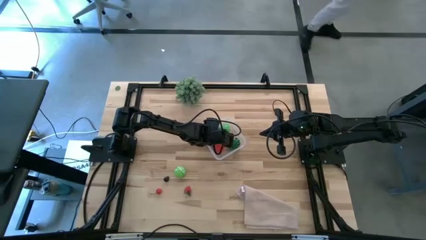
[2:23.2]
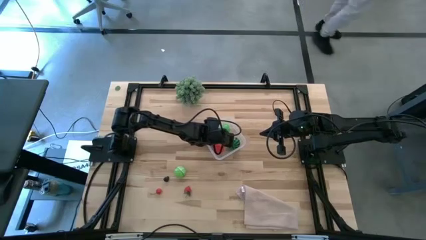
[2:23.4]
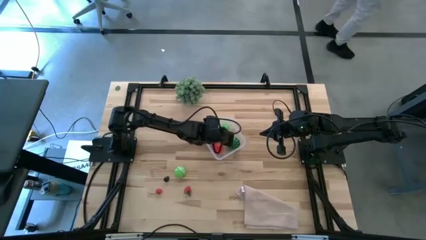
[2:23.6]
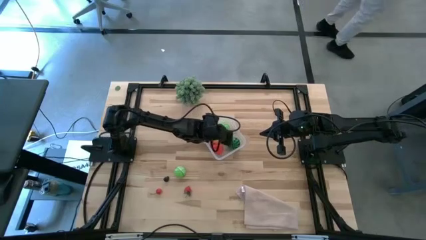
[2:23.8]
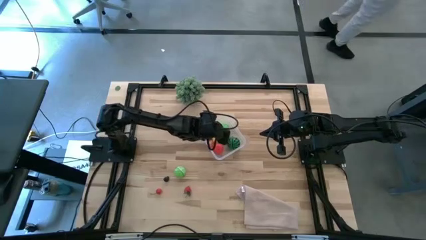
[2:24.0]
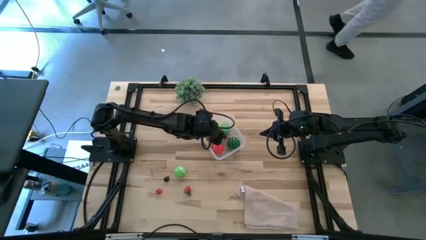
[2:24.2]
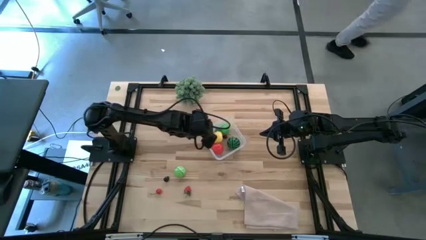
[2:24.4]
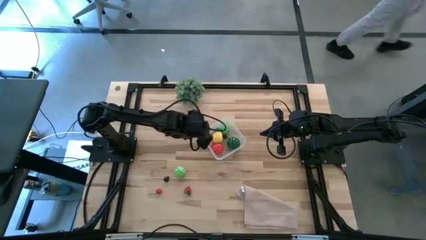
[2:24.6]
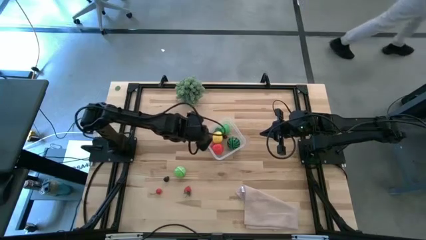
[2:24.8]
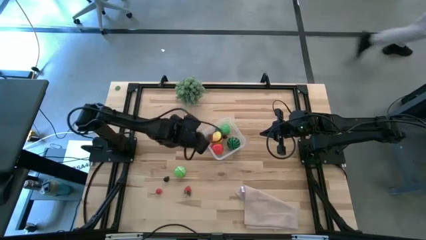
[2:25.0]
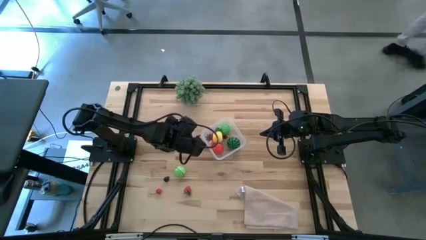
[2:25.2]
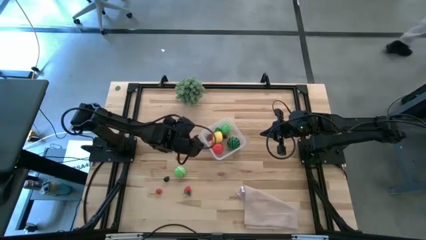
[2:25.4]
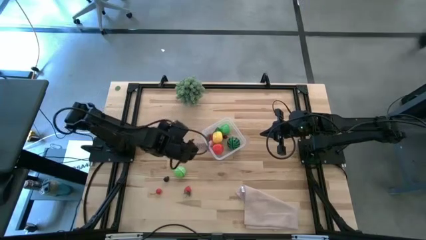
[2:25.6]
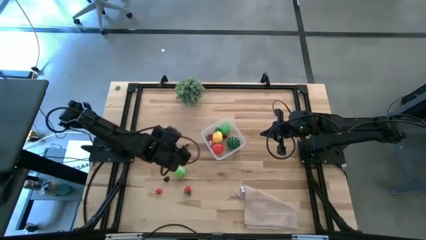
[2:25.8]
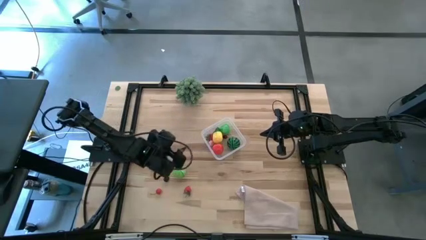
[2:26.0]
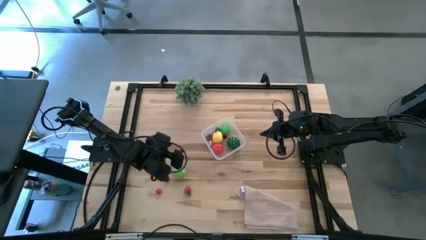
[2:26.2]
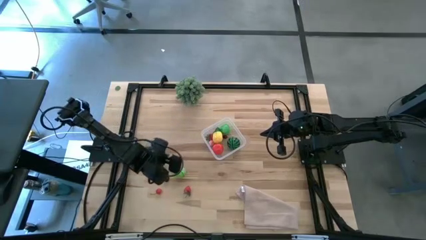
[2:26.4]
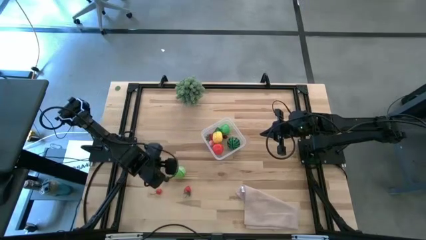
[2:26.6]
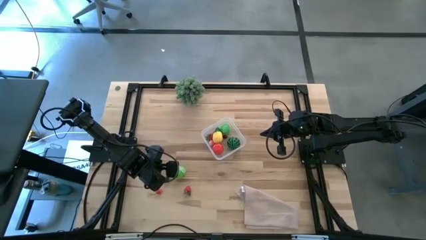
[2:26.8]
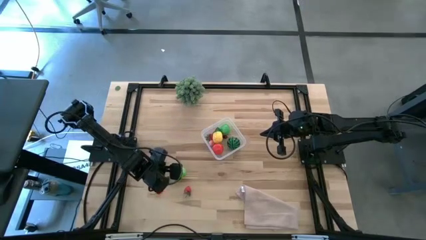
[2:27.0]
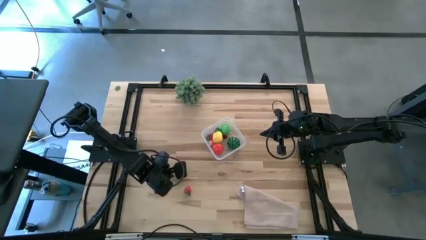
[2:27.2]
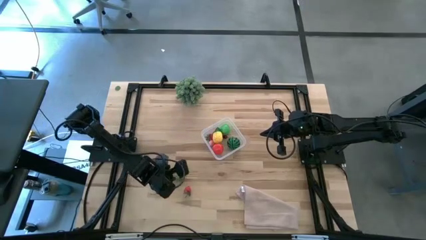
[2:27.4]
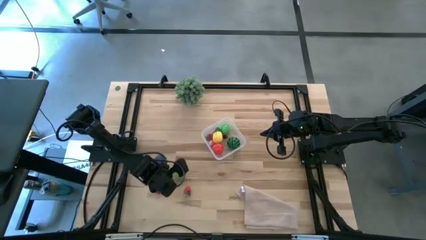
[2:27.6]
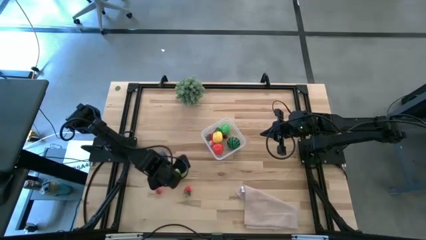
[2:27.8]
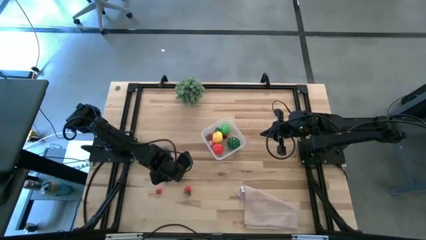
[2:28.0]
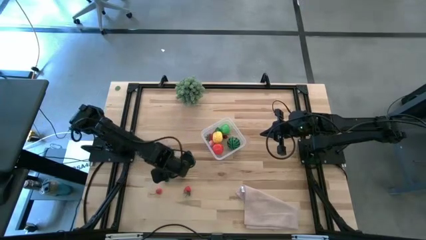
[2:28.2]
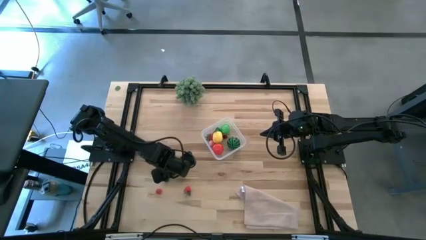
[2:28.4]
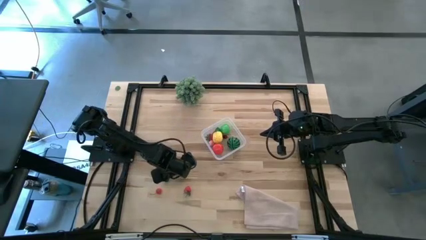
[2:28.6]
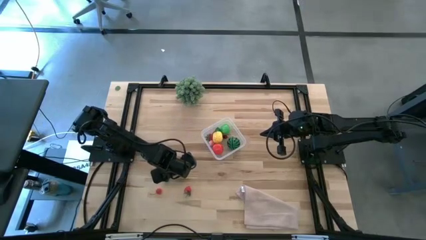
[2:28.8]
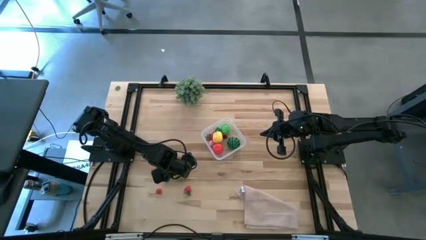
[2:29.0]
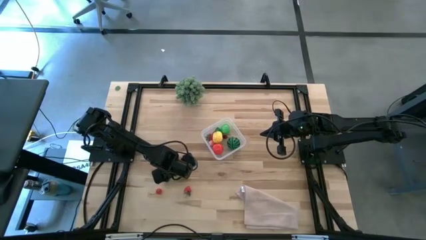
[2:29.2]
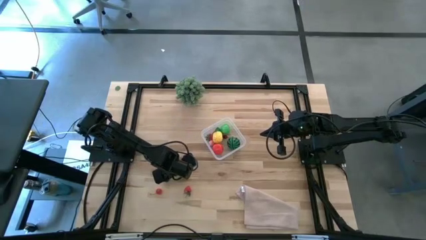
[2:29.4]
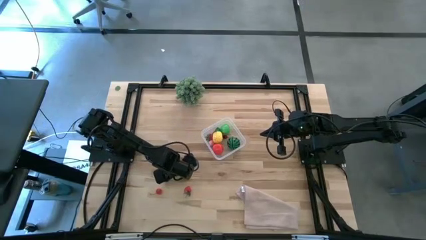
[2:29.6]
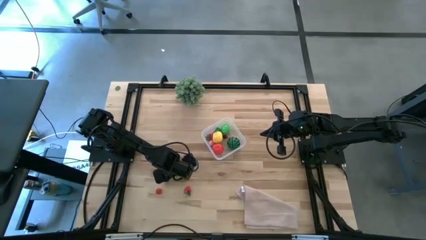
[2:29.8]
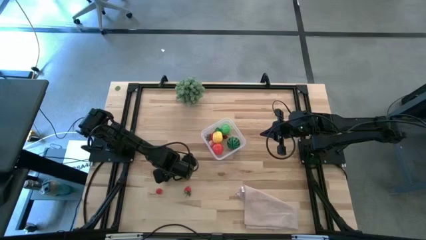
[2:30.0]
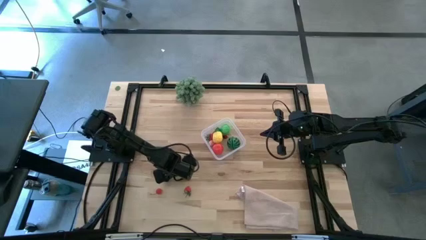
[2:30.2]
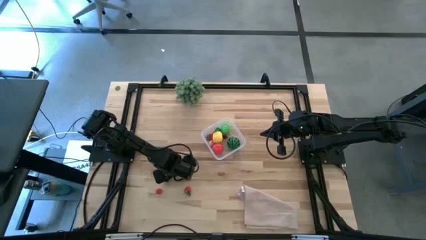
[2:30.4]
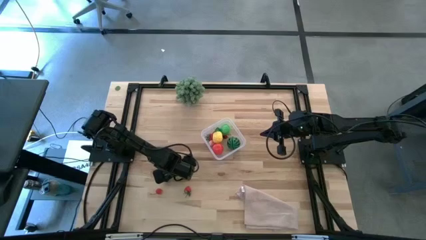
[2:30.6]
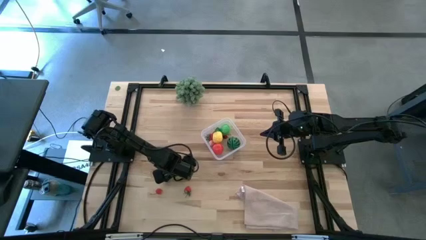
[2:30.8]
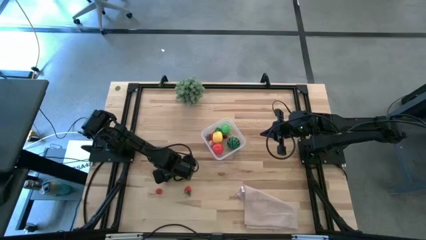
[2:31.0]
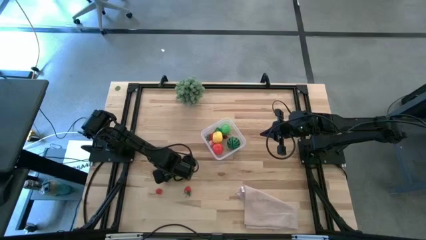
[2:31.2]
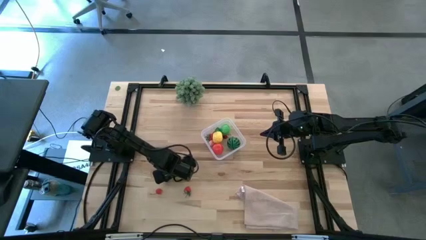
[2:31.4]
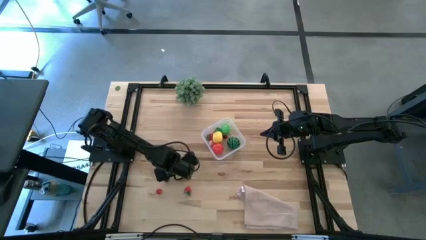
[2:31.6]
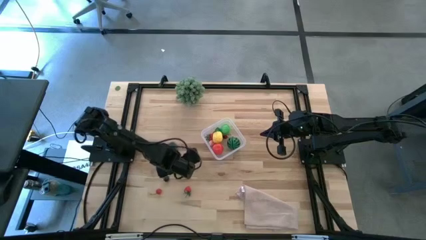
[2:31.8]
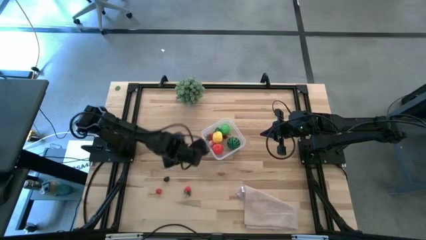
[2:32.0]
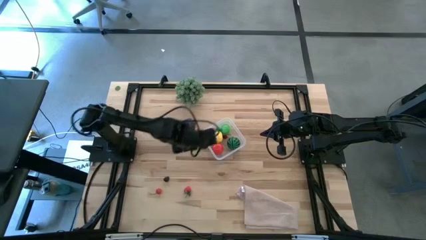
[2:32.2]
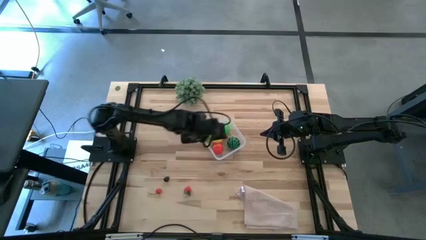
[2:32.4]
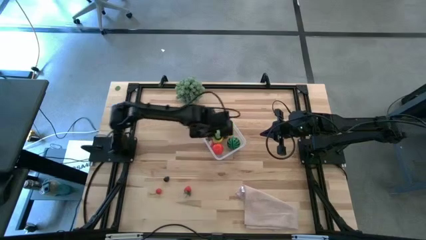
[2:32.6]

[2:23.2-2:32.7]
Task: Pick and placing Produce into tupperware
Put the green cabbage into the transparent bin

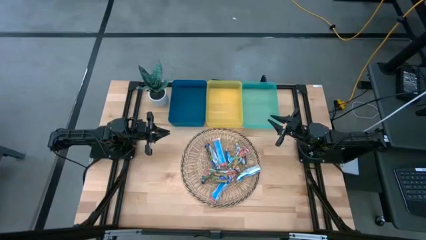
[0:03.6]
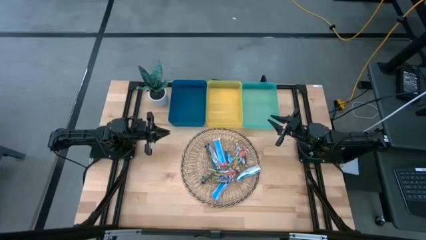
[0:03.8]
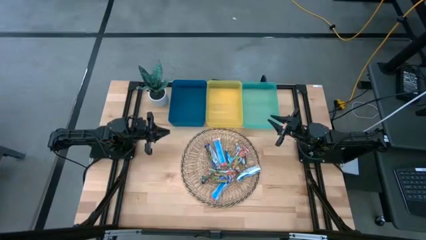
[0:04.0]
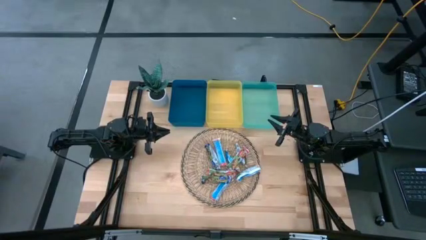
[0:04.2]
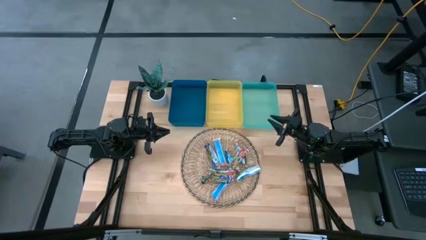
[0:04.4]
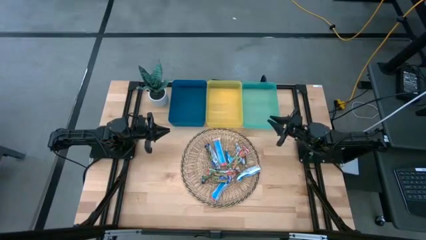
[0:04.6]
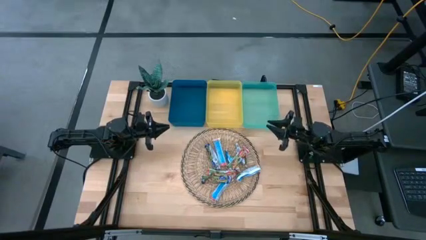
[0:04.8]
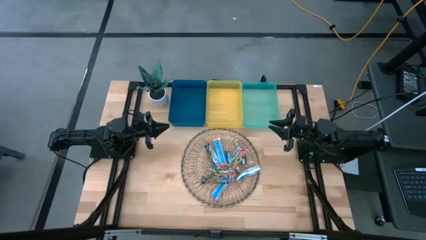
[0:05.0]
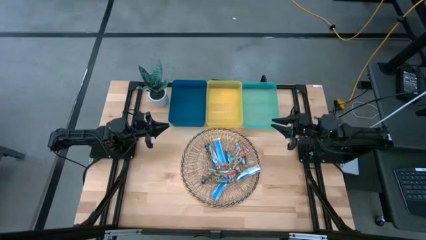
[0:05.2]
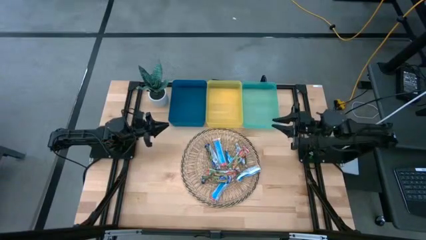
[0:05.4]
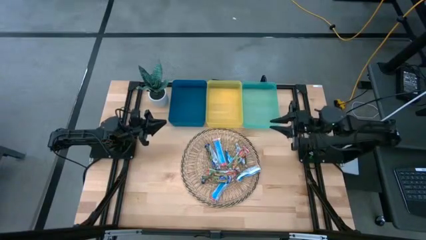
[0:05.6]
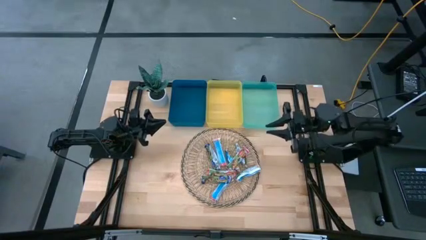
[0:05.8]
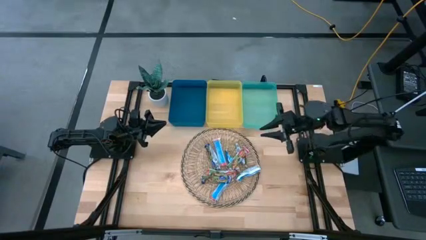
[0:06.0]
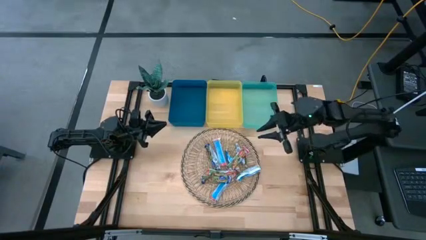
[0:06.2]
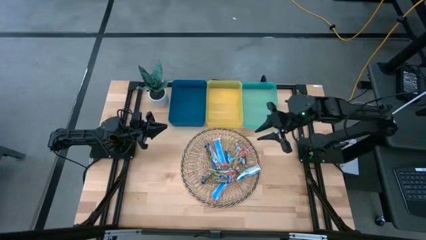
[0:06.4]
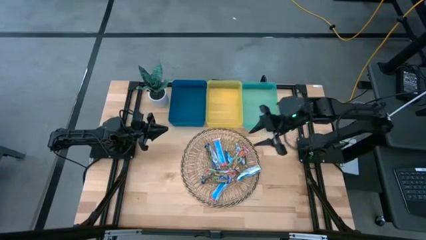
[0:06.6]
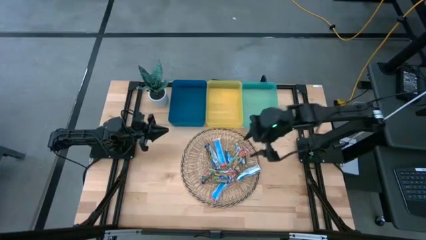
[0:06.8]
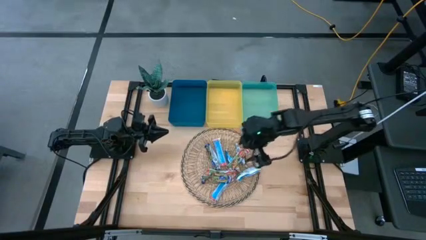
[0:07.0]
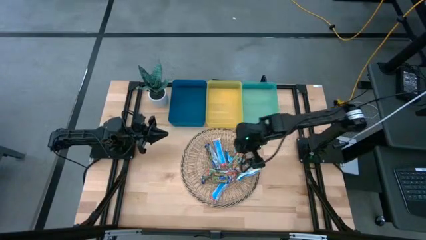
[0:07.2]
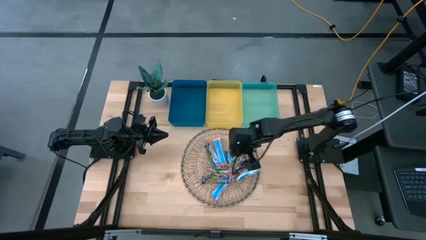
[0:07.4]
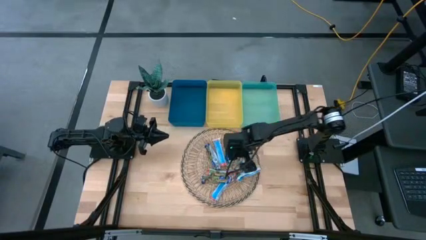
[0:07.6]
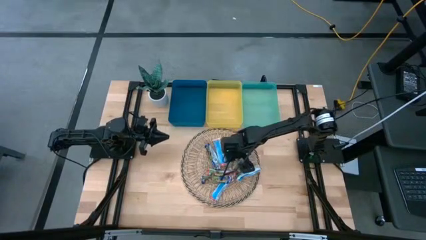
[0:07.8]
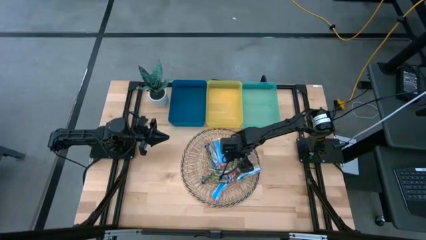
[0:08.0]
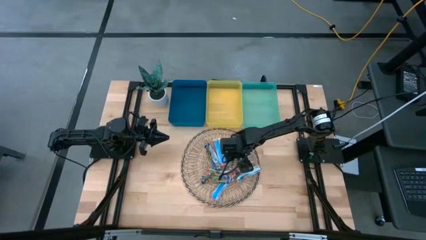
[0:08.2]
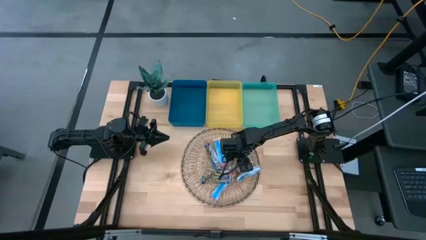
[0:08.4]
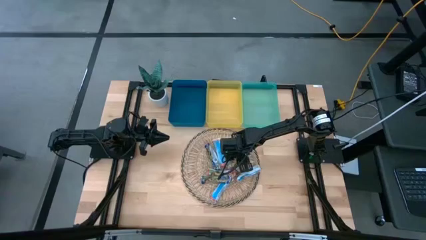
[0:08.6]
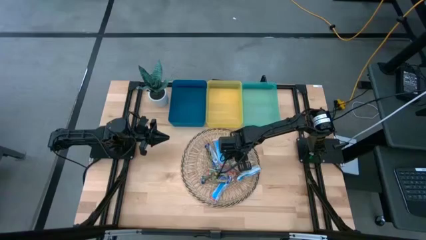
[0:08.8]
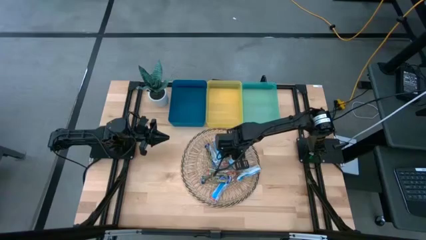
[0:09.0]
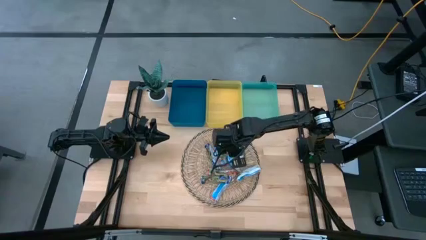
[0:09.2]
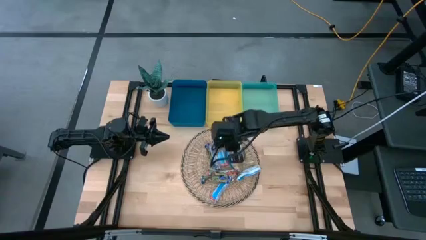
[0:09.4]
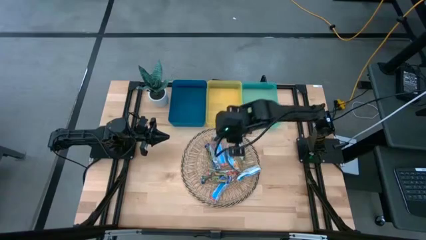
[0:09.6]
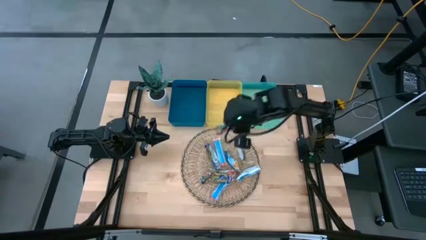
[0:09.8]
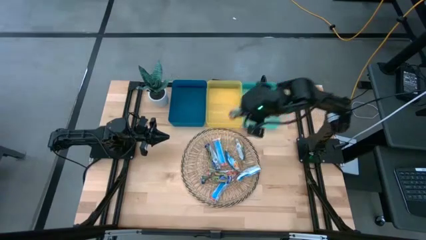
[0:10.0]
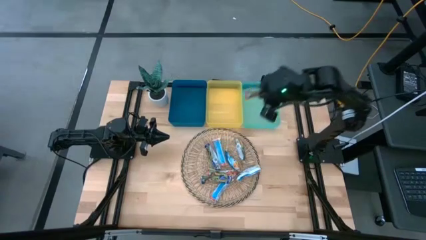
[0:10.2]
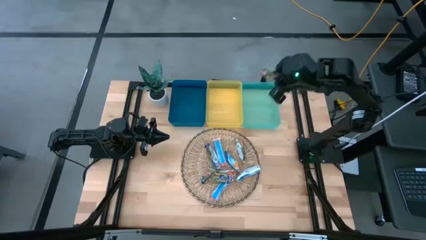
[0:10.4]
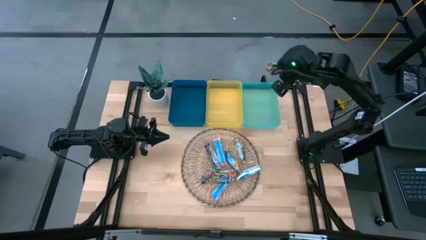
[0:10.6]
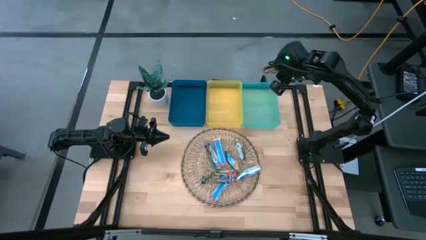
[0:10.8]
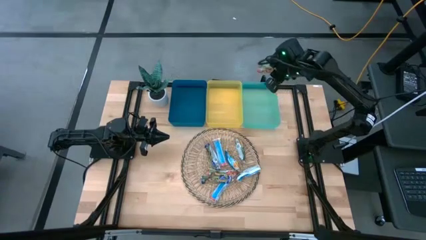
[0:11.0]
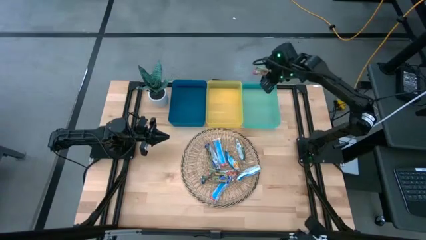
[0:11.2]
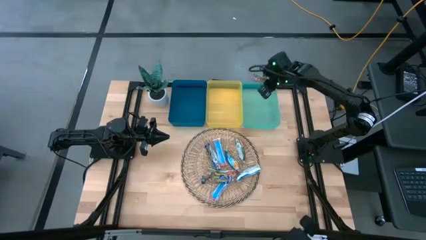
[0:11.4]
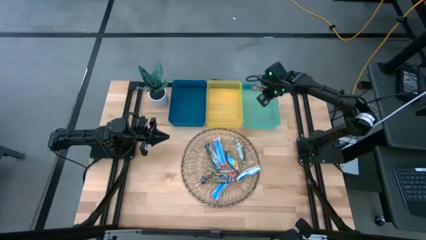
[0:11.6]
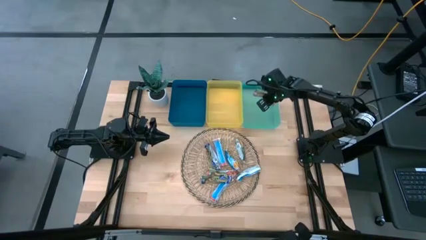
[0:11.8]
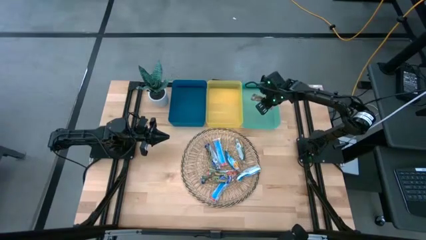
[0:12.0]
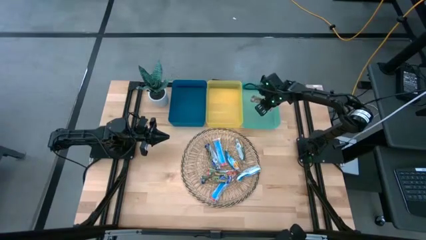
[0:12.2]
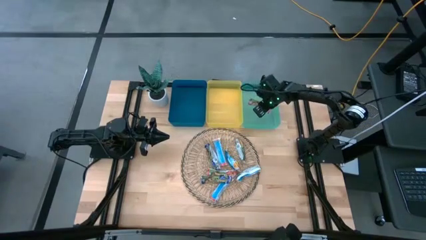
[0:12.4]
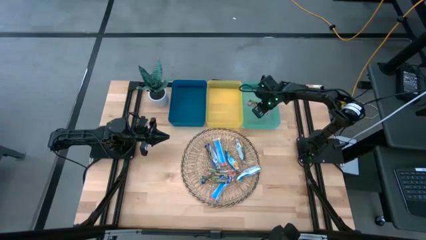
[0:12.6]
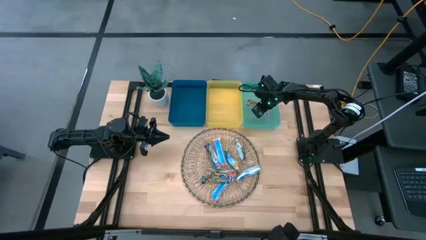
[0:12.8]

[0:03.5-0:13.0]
Task: Pick and place Granola Bars by type
Put the red granola bar into the green bin
